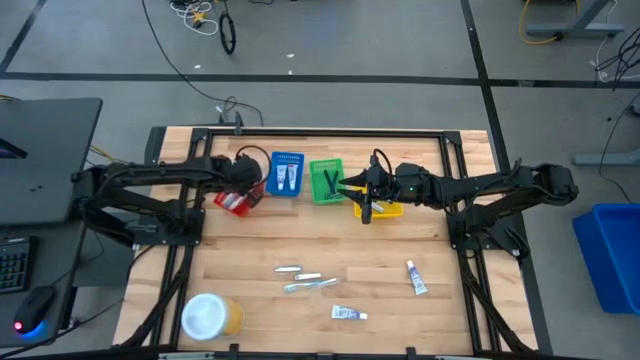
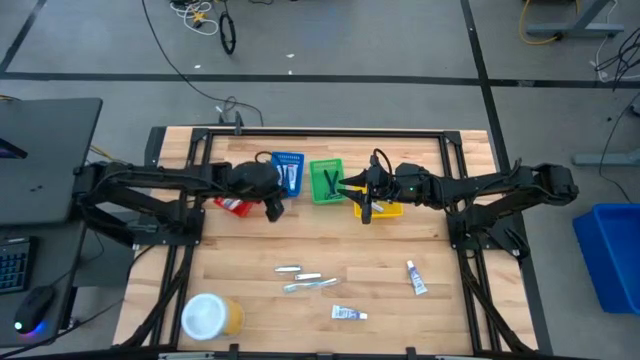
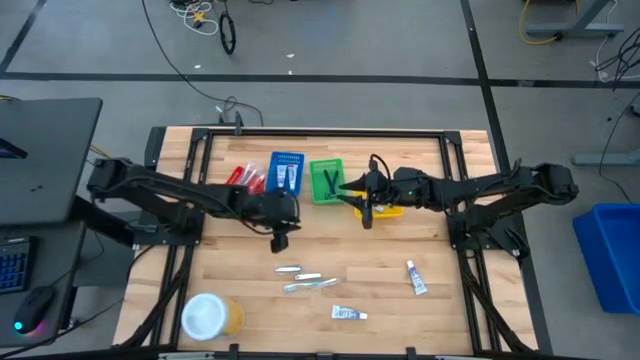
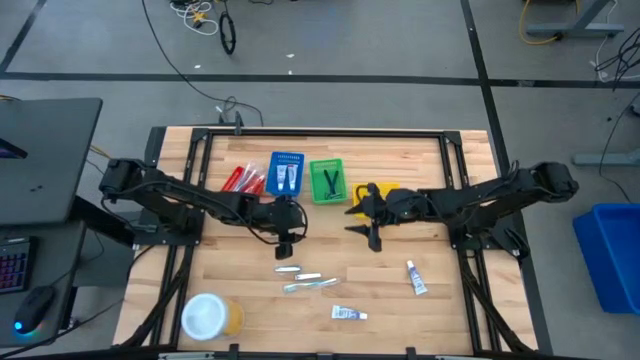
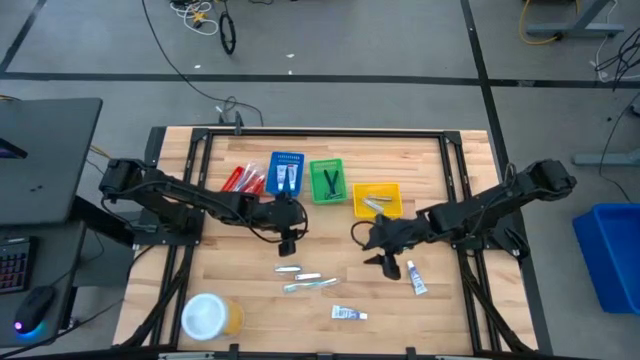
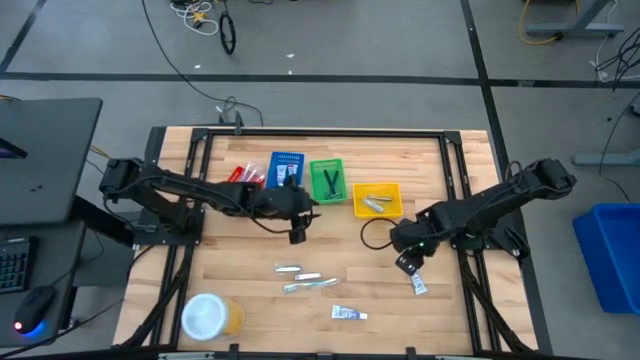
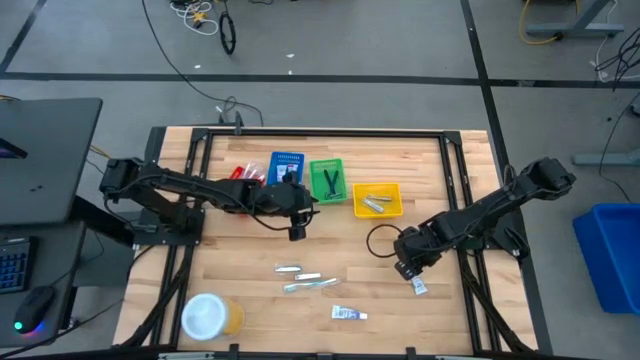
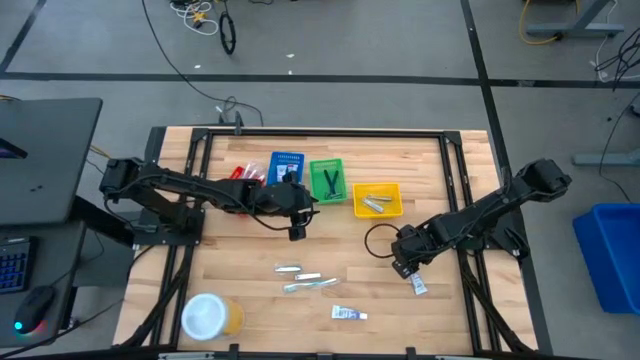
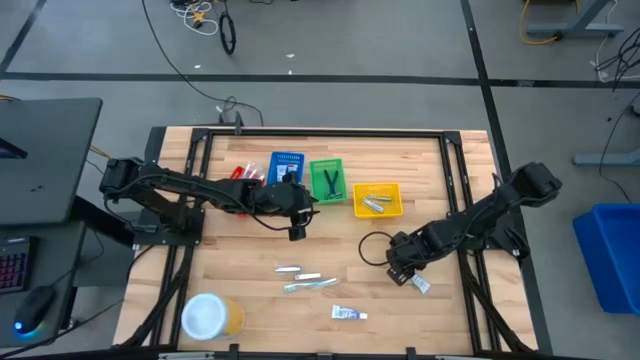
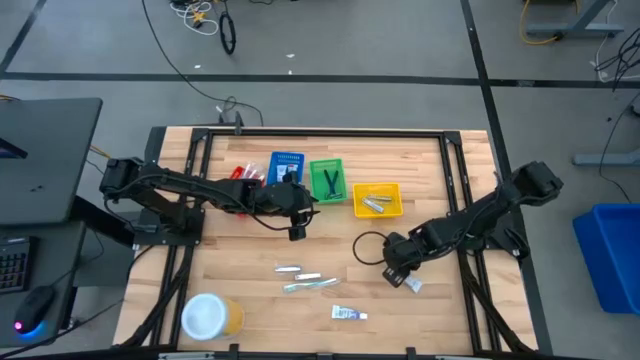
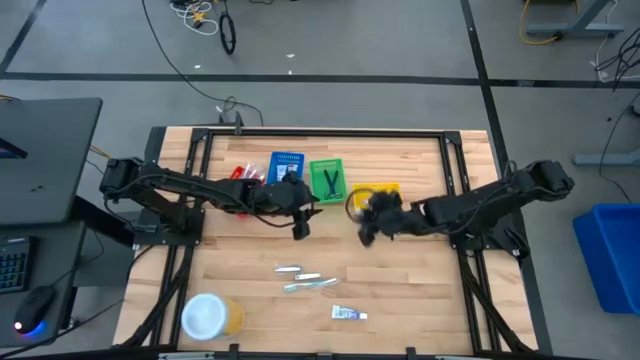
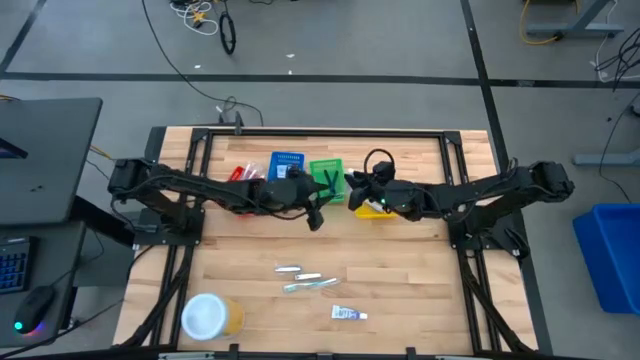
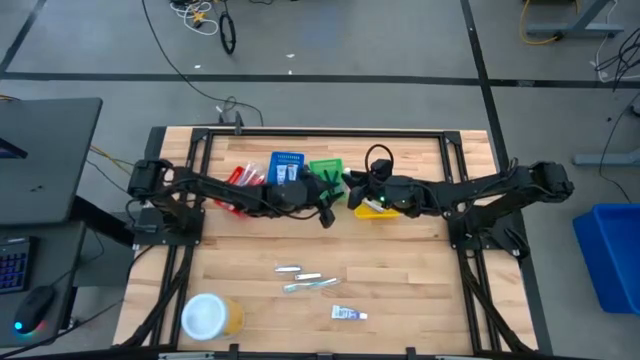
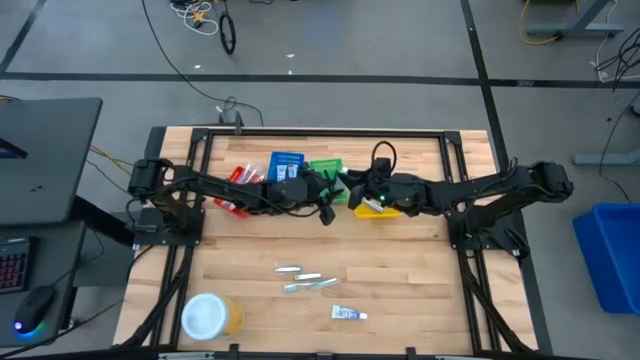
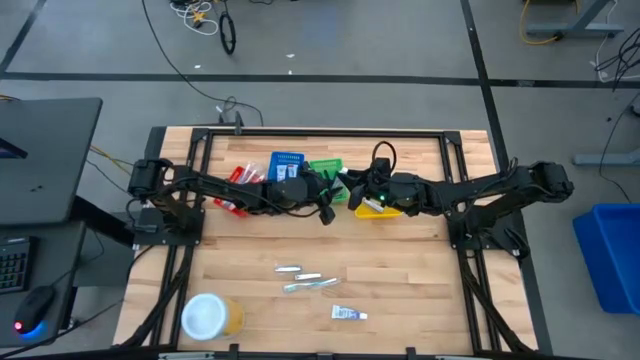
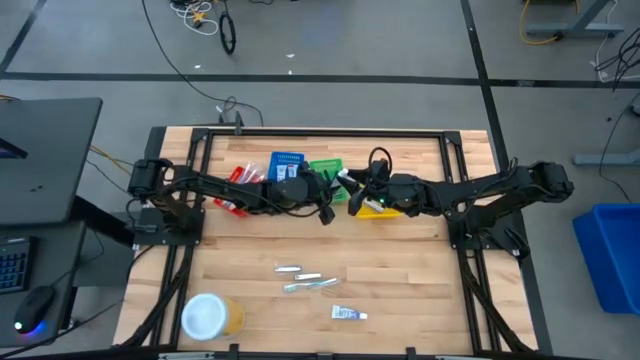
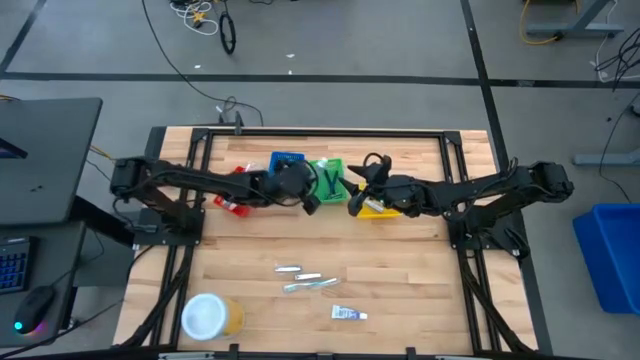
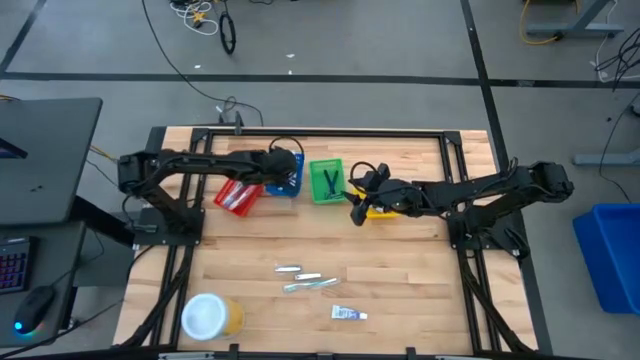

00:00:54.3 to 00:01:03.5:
Task: Pick & Place Travel size toiletries
Put the white toothpaste into the blue bin

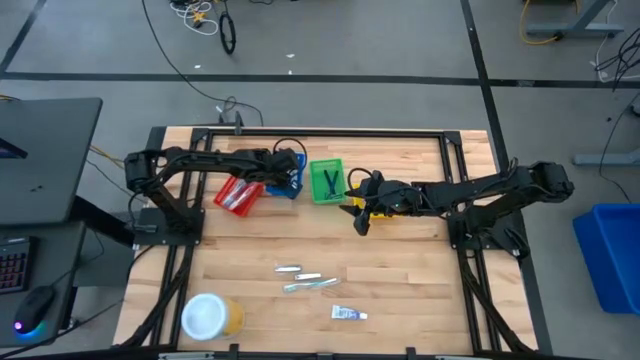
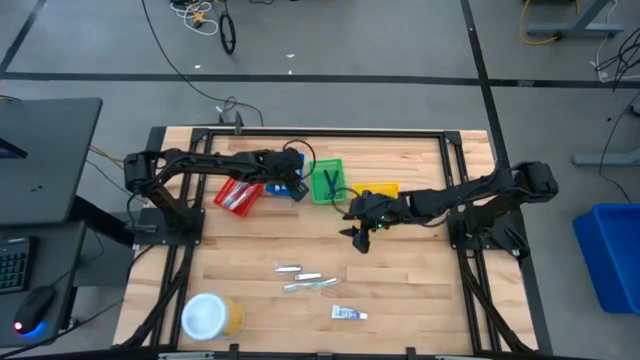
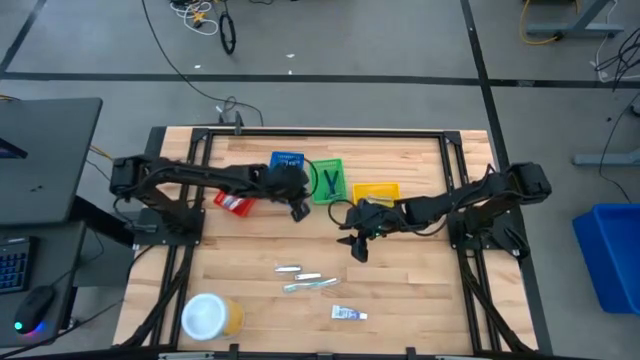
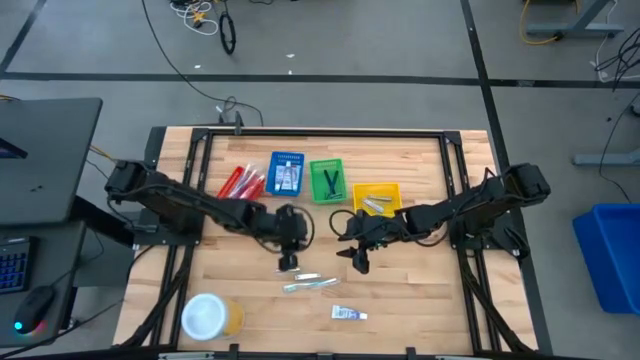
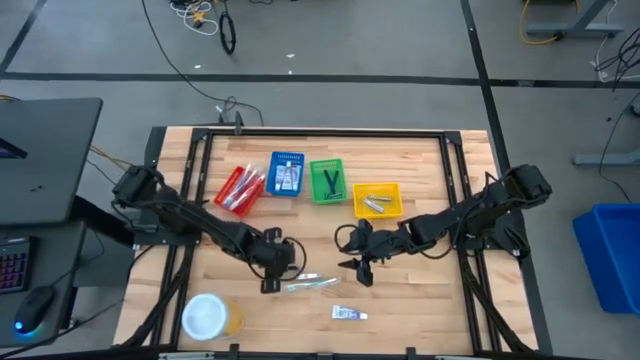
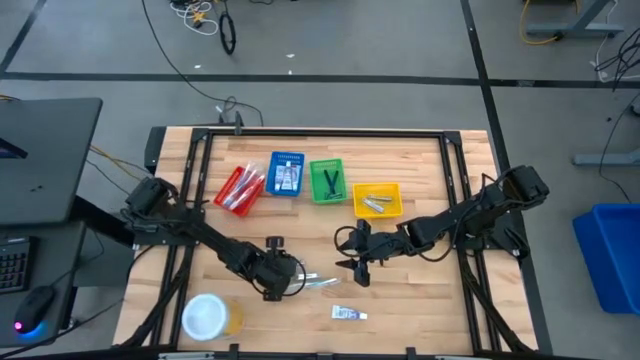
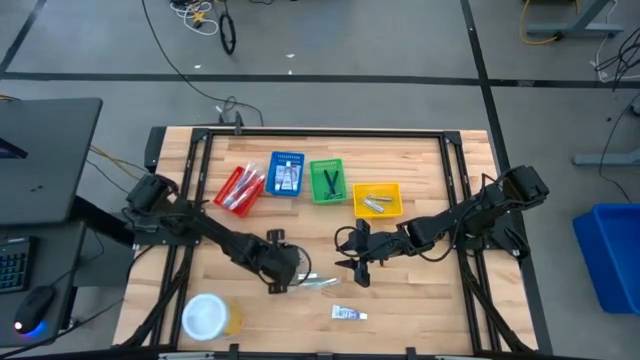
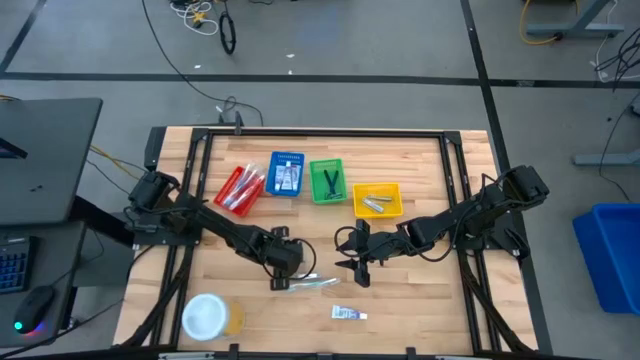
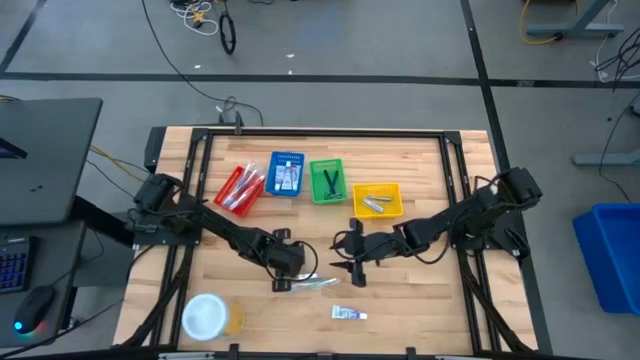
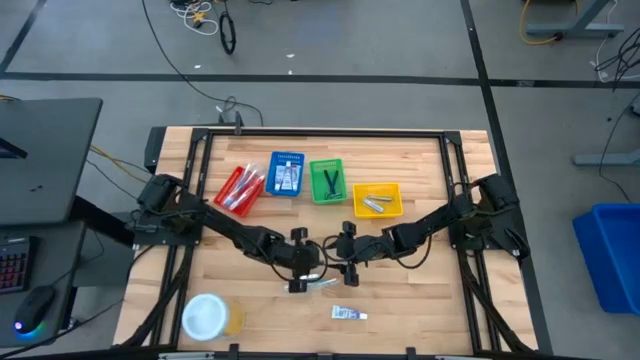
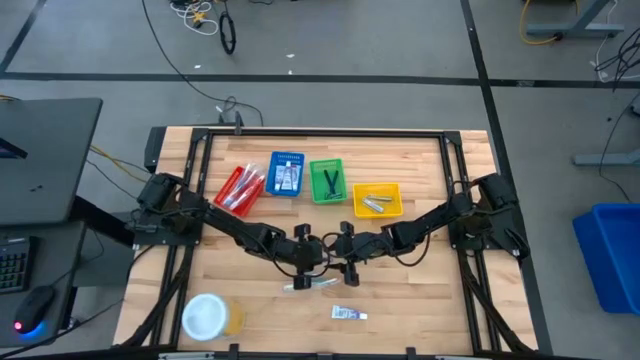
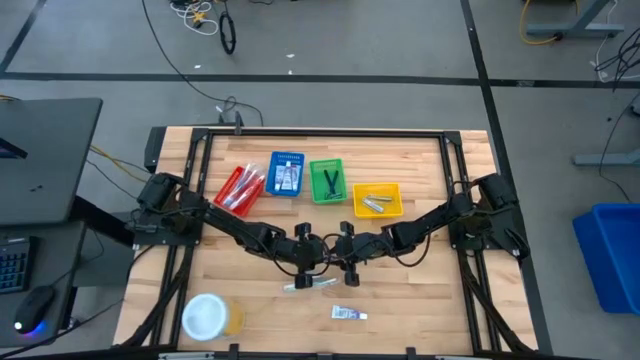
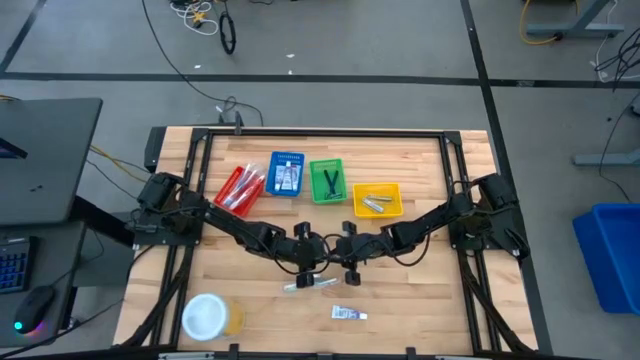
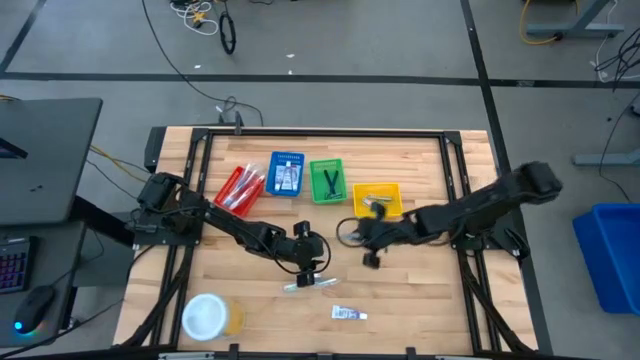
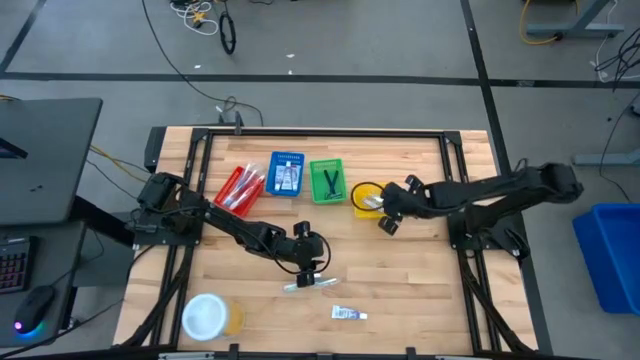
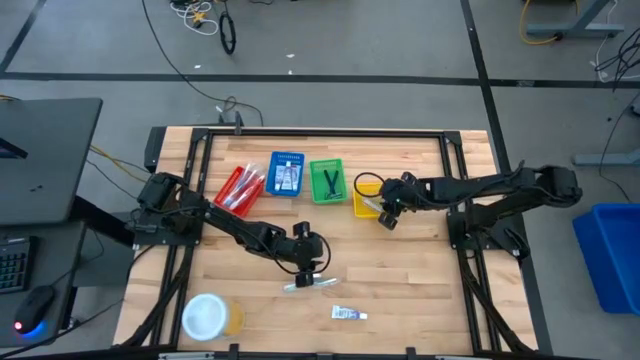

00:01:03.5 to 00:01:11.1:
Put the silver nail cutter into the yellow bin

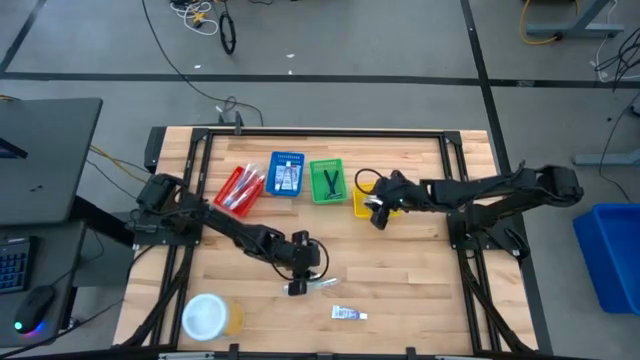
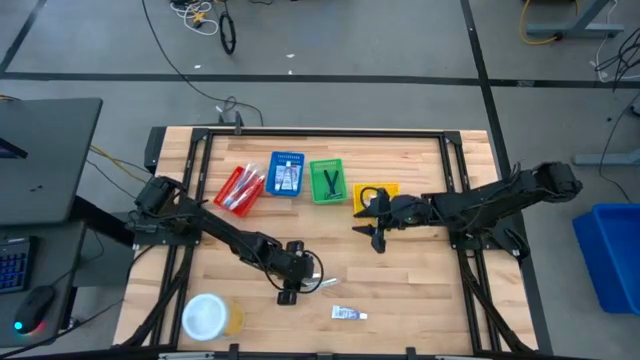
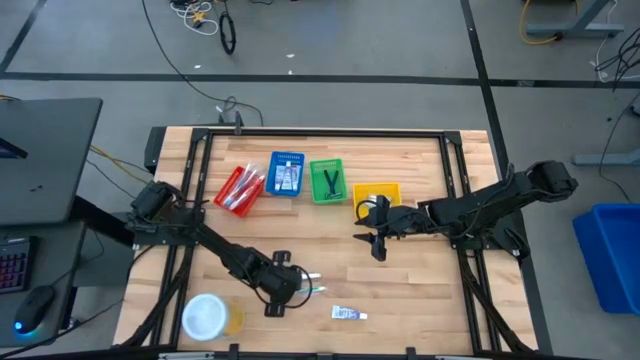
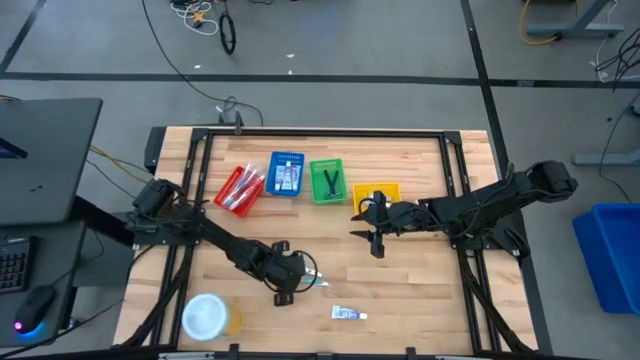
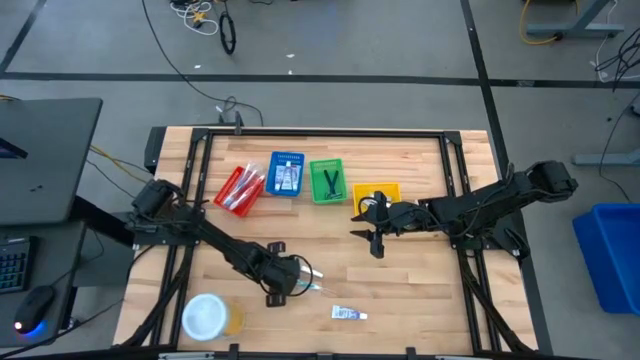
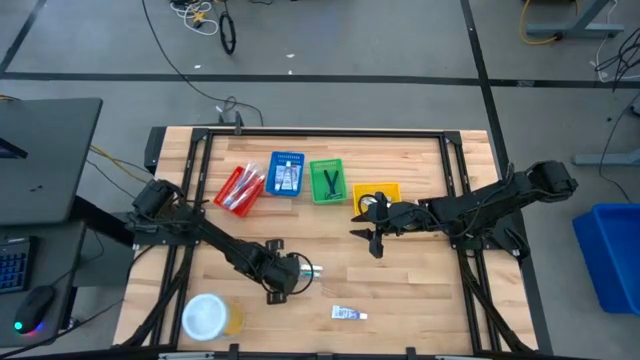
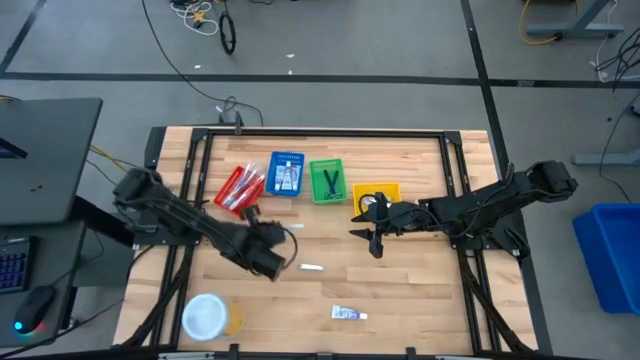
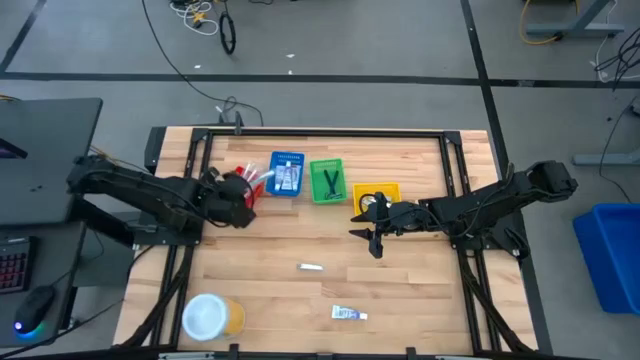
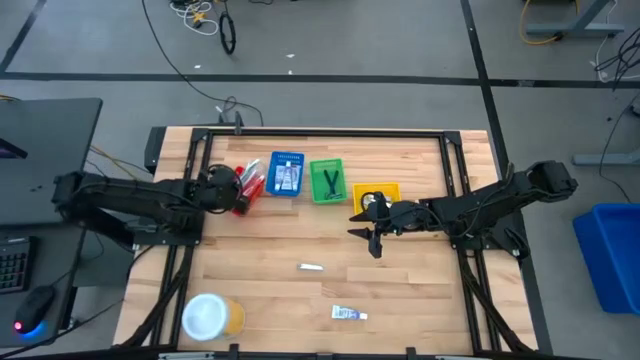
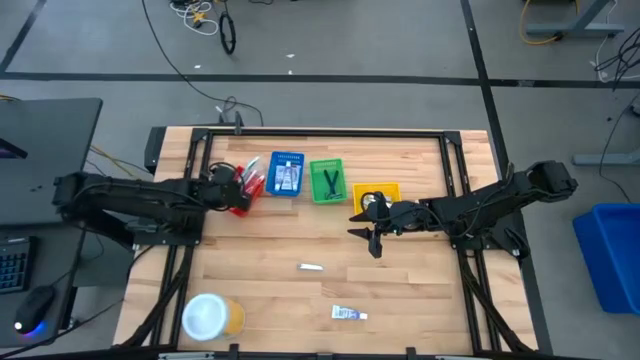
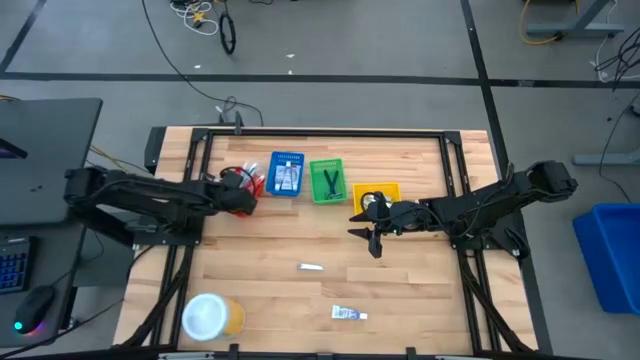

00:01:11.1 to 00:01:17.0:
Put the green toothbrush into the red bin
